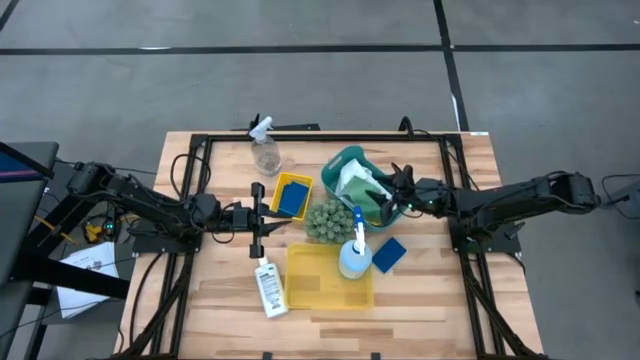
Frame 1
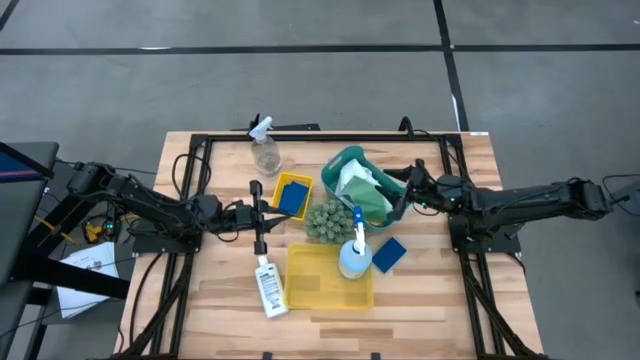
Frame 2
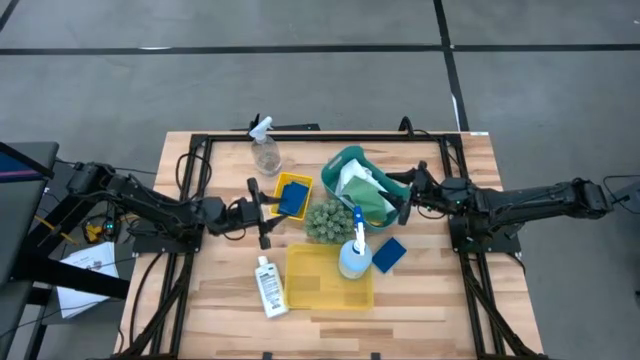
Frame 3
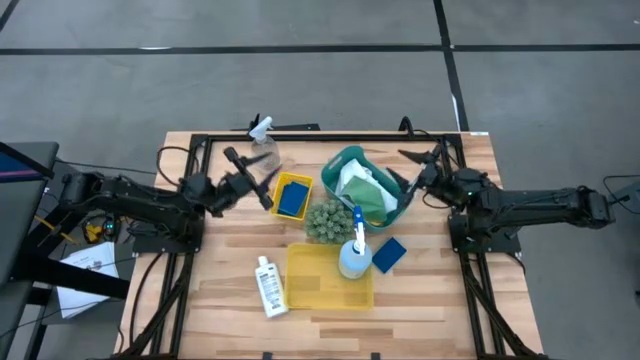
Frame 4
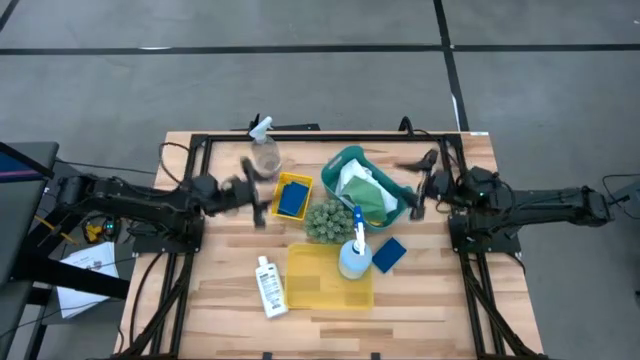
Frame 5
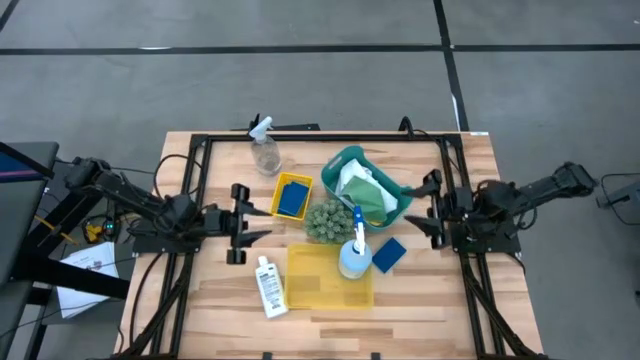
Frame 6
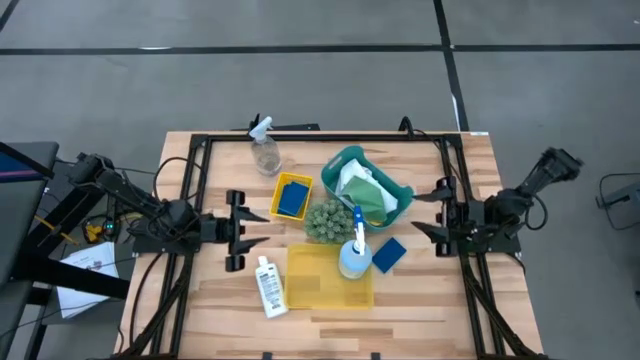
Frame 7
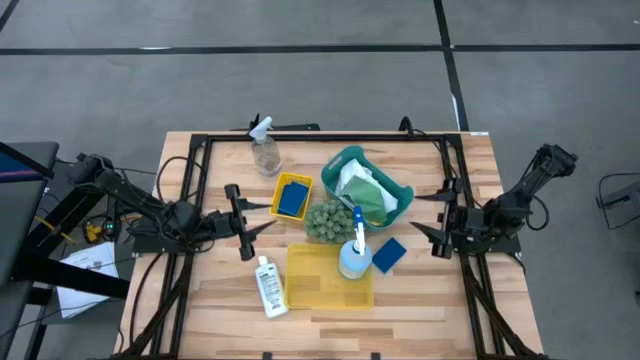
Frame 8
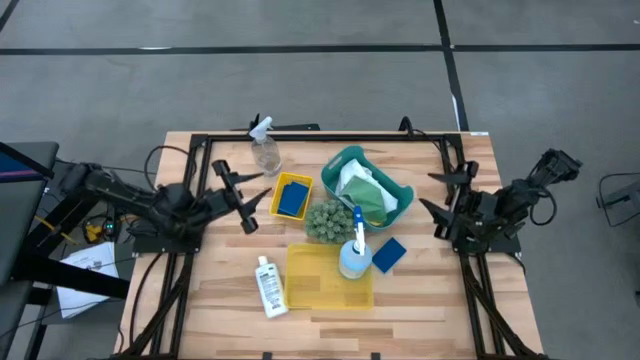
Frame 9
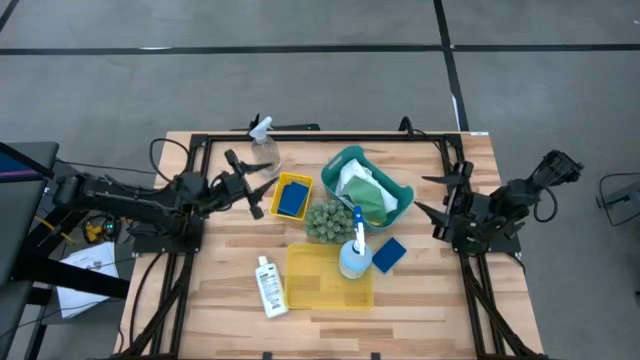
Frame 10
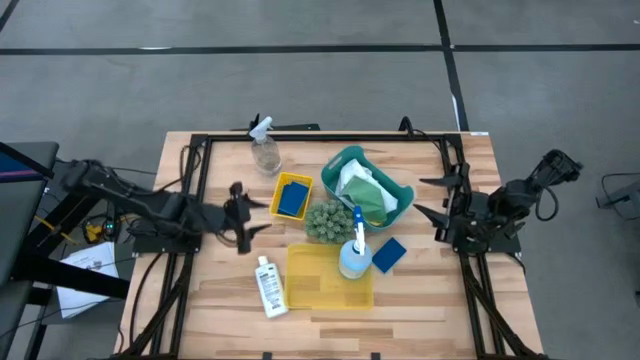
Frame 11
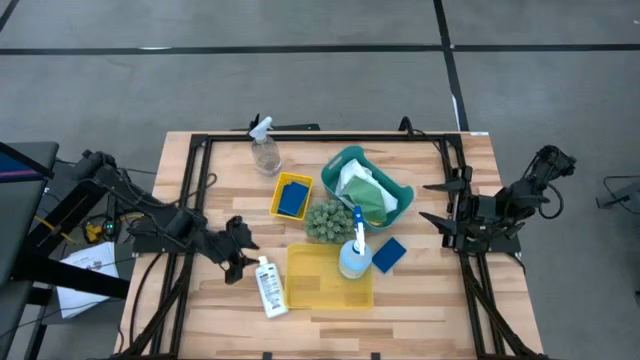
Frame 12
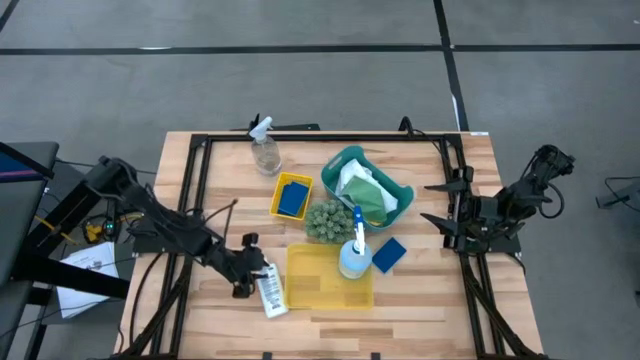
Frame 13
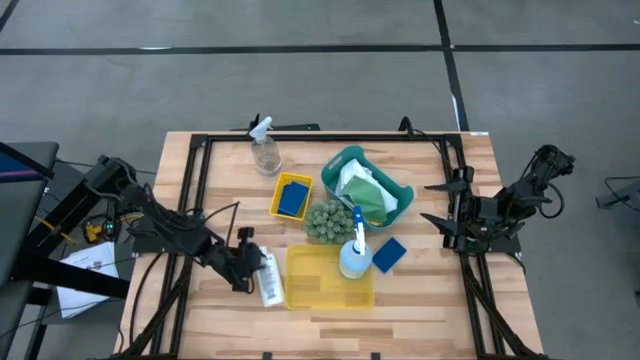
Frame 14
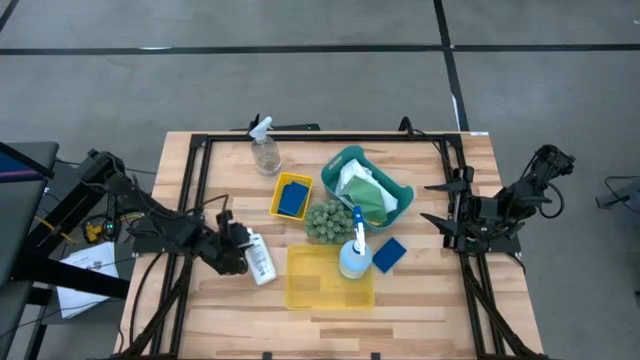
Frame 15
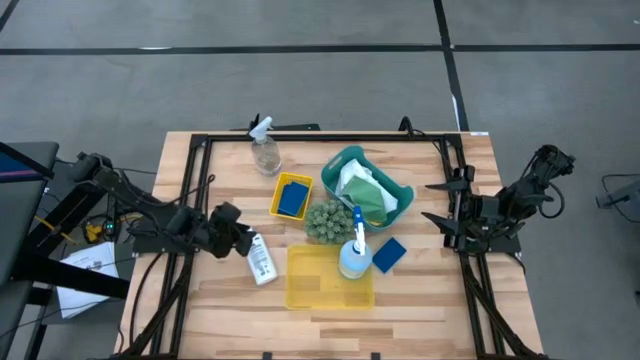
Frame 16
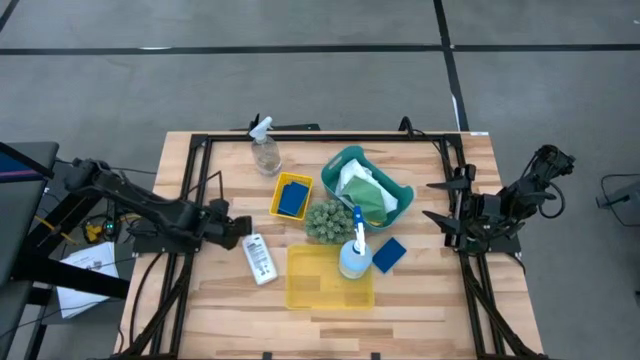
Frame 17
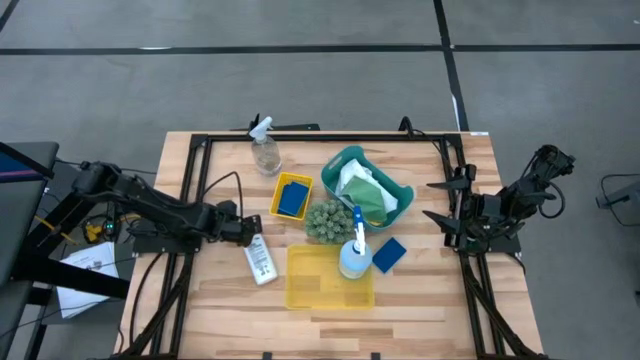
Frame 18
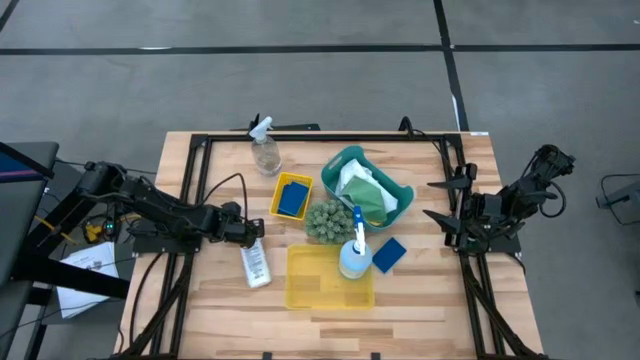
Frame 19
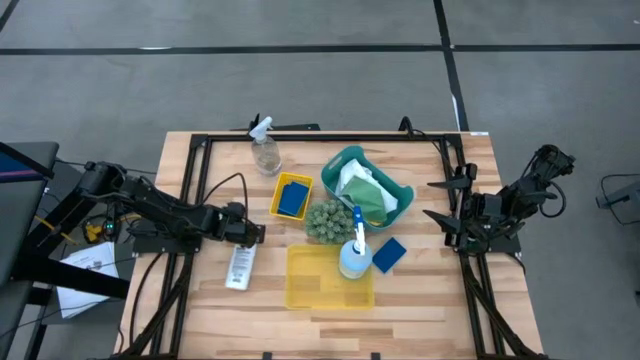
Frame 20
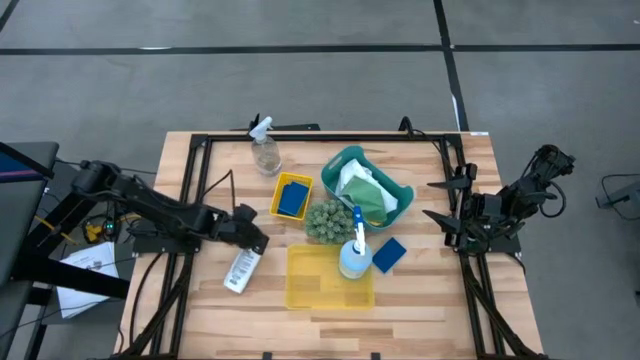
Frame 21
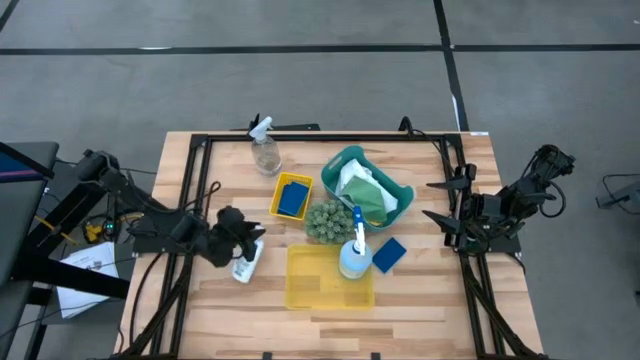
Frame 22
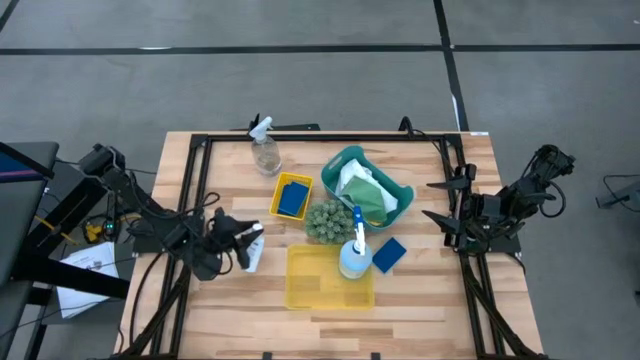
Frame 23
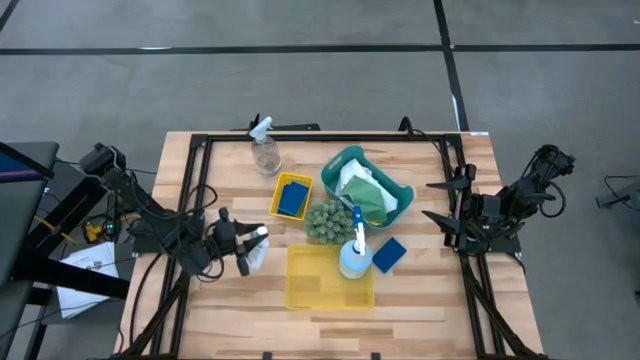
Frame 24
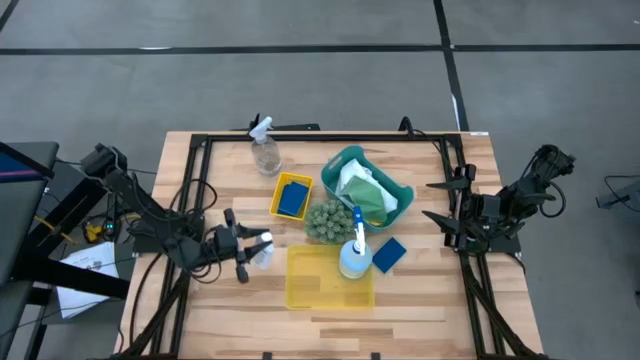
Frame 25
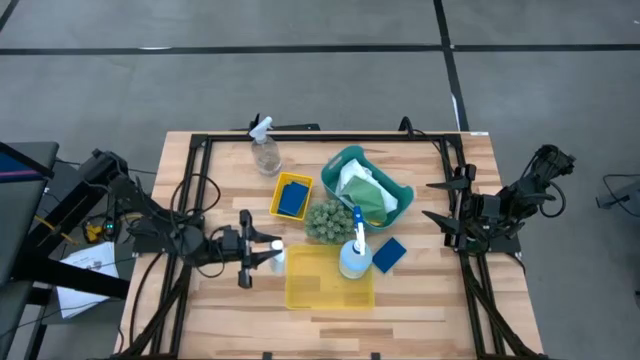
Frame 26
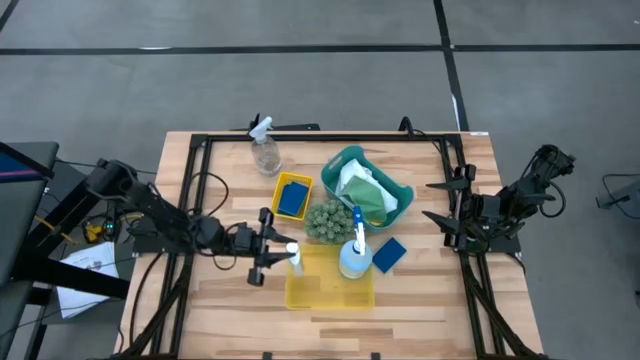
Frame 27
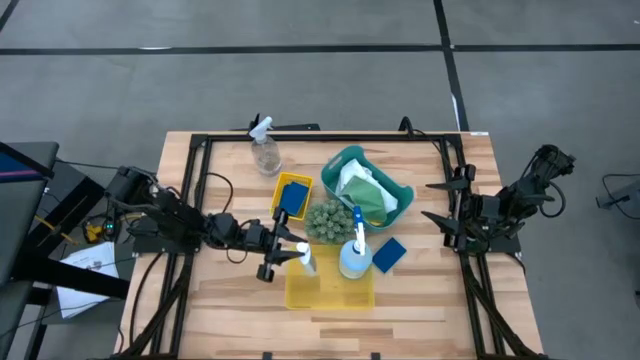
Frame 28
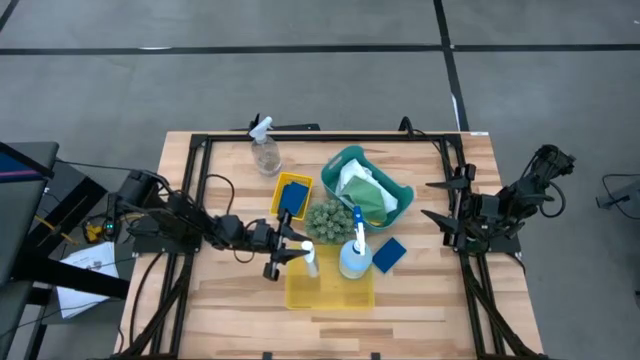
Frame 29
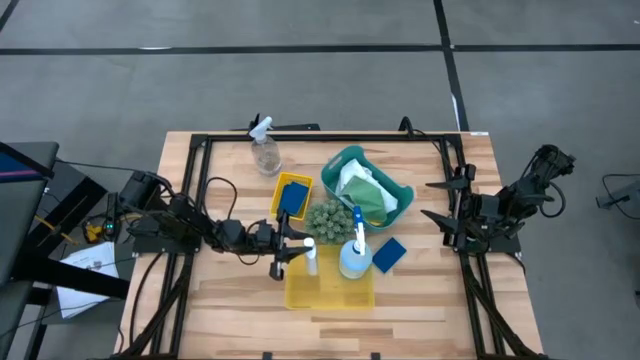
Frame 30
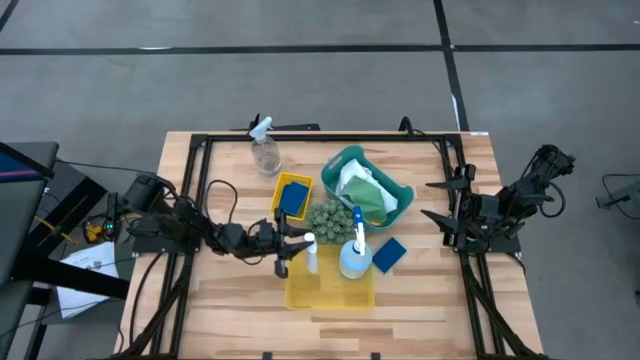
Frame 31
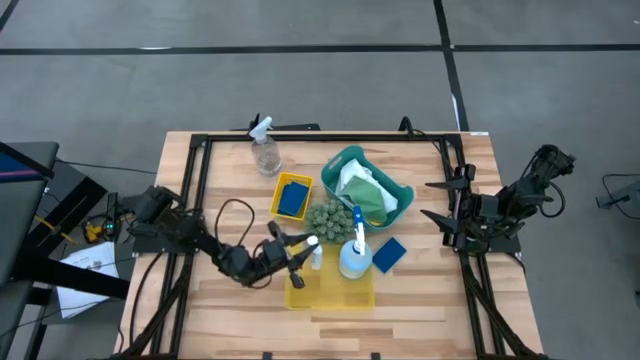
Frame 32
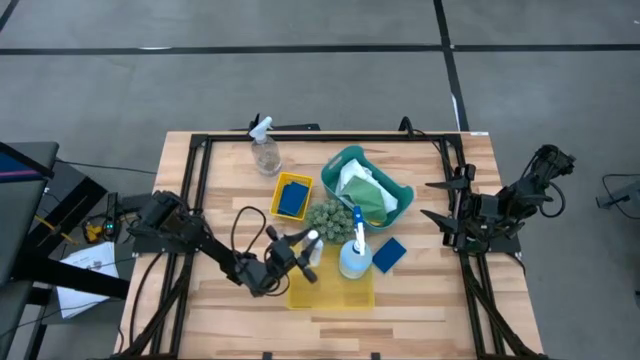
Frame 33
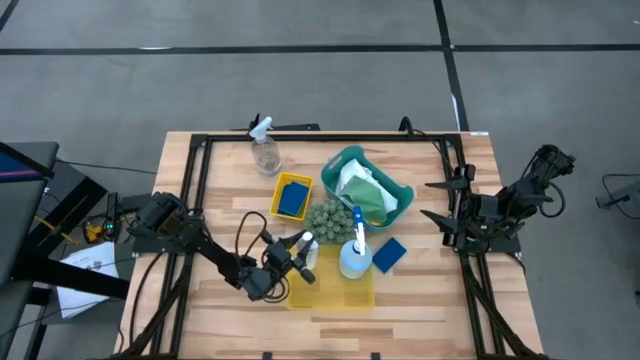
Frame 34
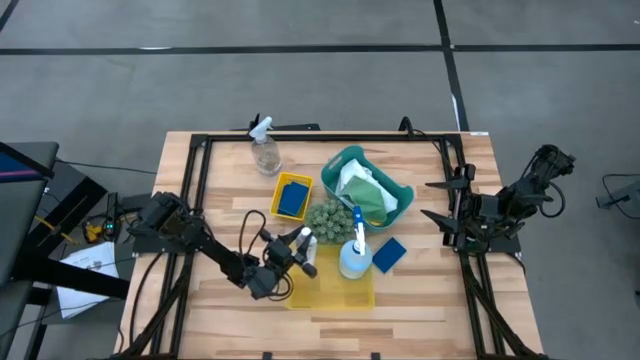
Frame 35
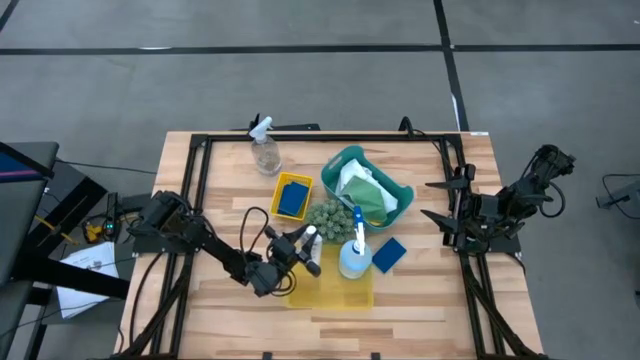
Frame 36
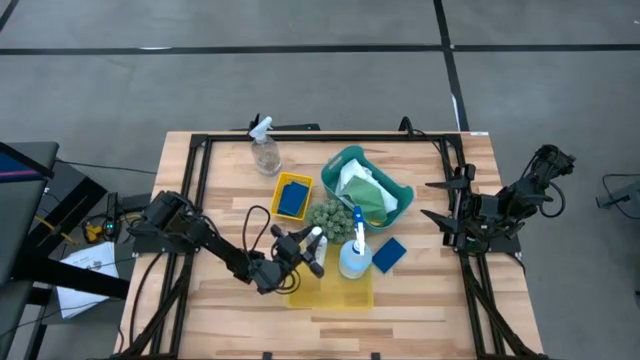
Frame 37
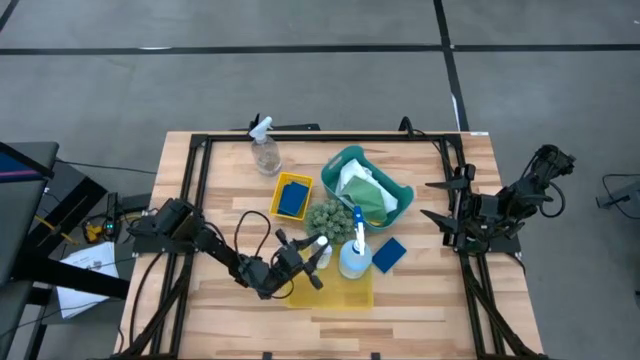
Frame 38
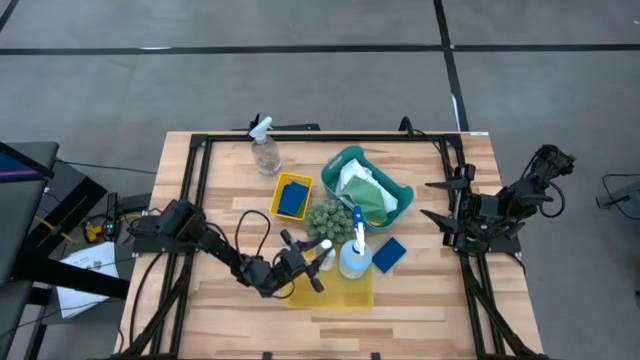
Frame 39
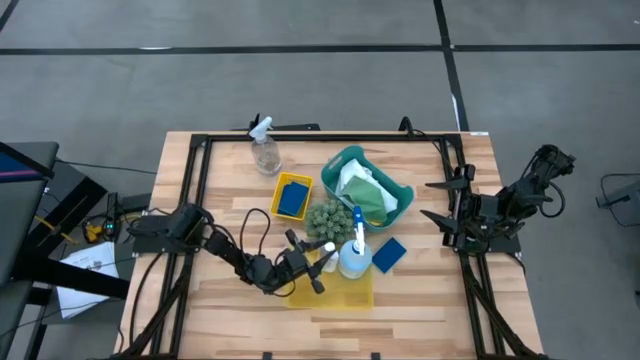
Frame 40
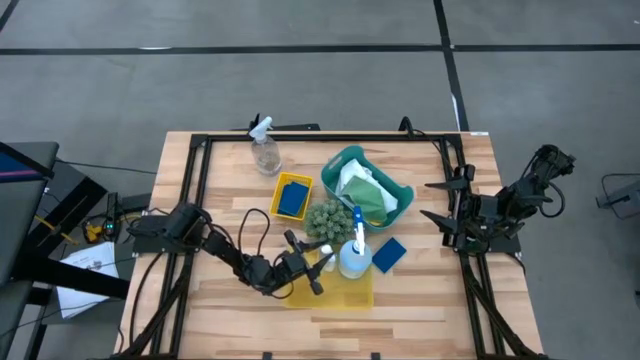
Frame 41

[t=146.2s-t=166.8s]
Task: Pick & Place Kitchen Items
Put the white plastic restorer bottle into the bottom yellow bin
